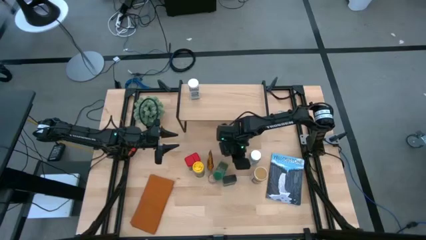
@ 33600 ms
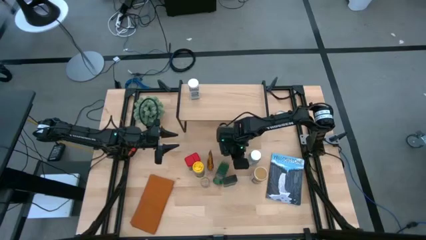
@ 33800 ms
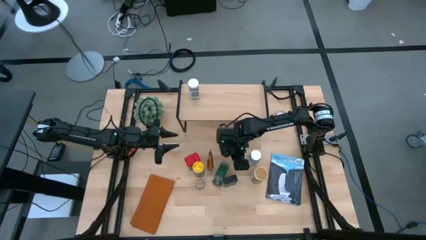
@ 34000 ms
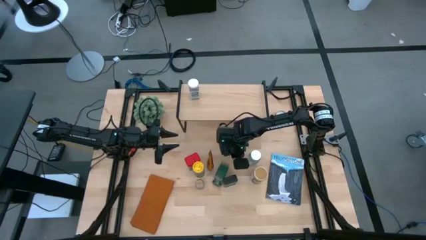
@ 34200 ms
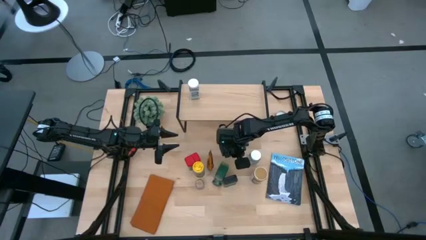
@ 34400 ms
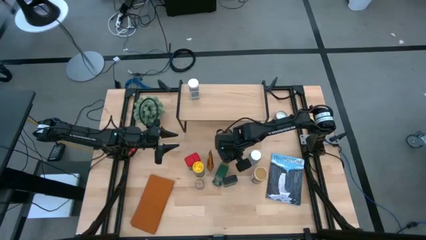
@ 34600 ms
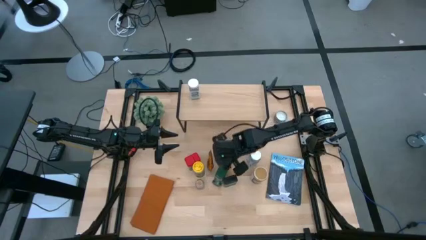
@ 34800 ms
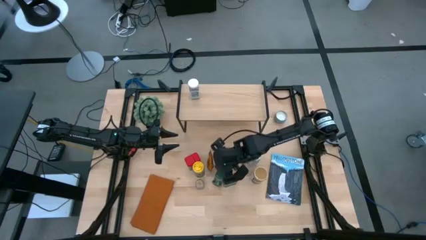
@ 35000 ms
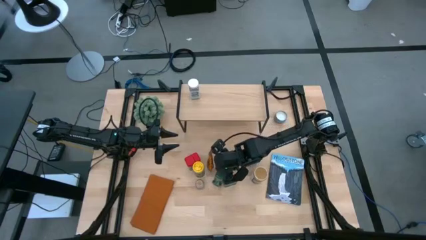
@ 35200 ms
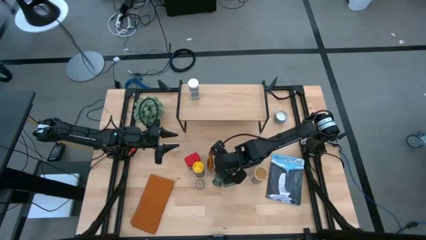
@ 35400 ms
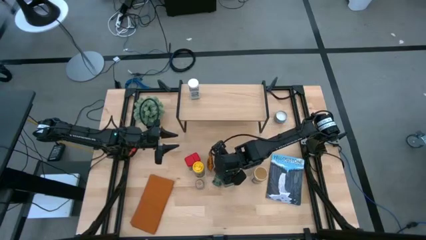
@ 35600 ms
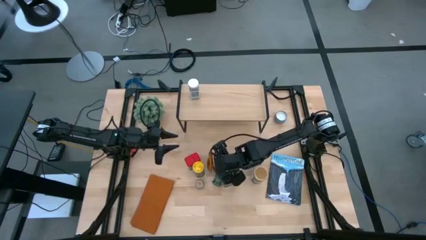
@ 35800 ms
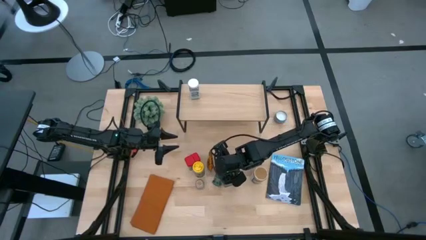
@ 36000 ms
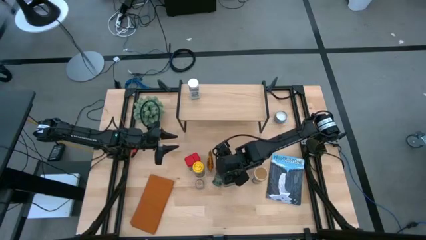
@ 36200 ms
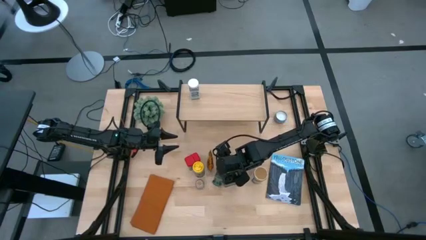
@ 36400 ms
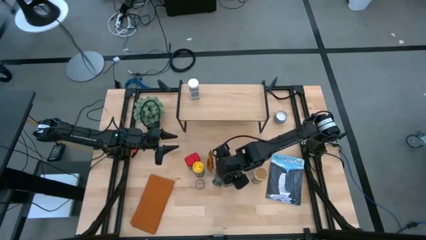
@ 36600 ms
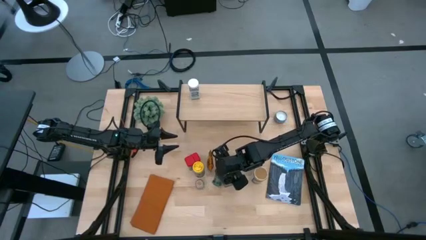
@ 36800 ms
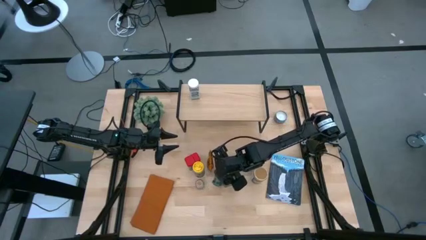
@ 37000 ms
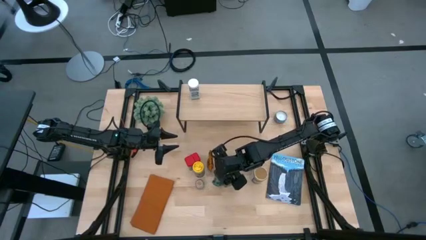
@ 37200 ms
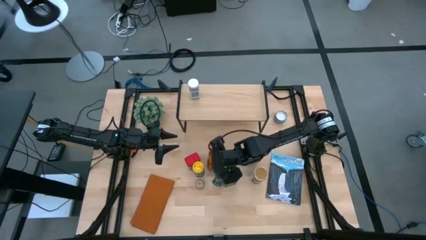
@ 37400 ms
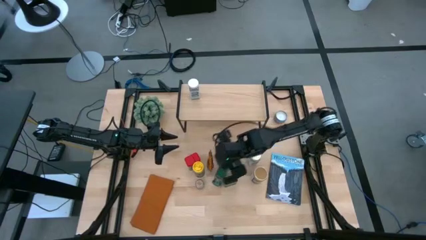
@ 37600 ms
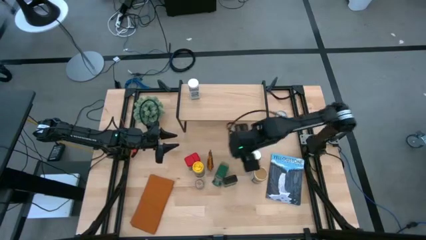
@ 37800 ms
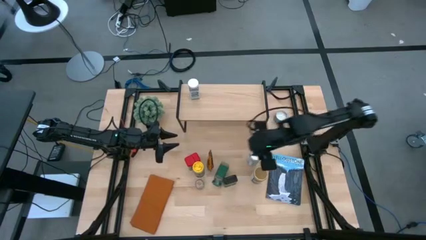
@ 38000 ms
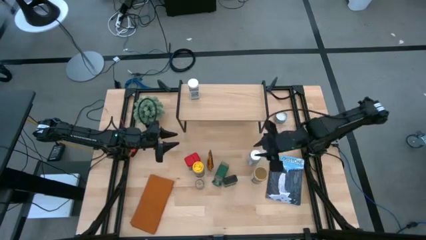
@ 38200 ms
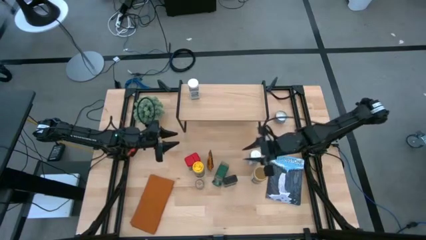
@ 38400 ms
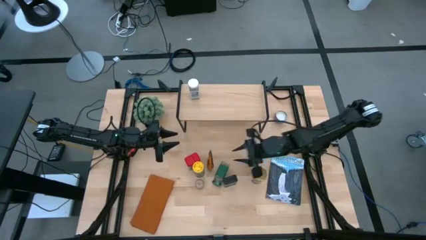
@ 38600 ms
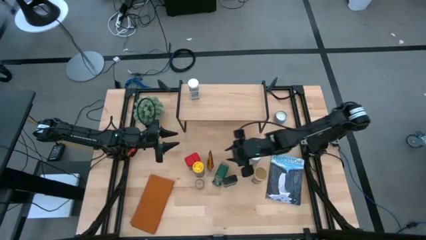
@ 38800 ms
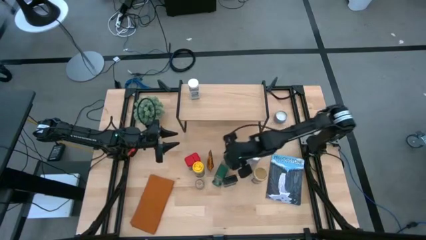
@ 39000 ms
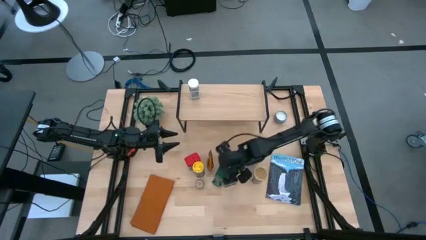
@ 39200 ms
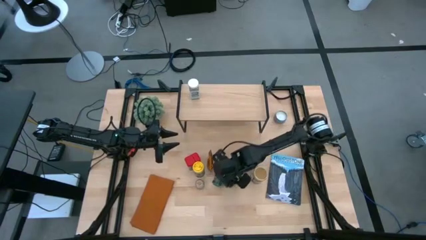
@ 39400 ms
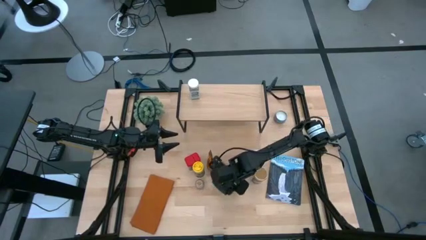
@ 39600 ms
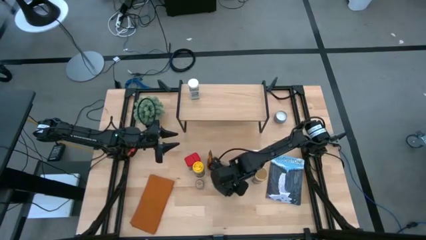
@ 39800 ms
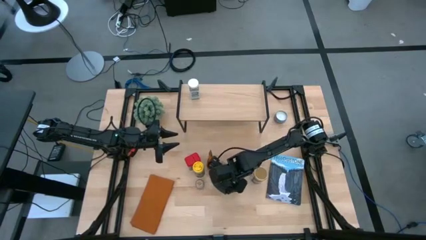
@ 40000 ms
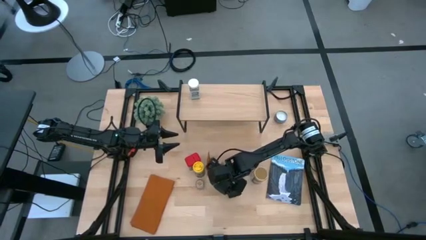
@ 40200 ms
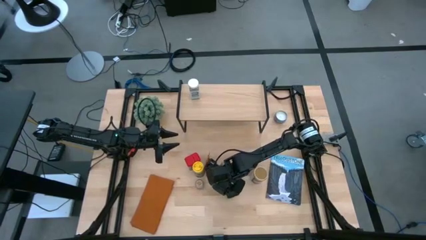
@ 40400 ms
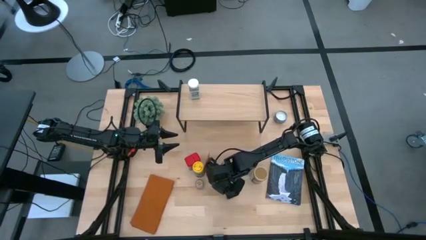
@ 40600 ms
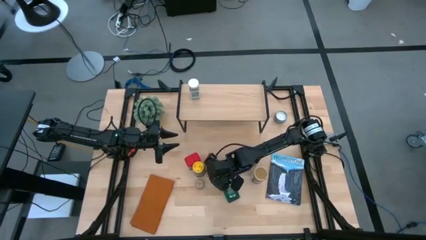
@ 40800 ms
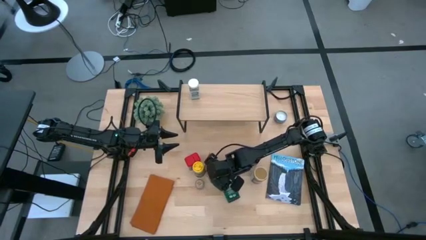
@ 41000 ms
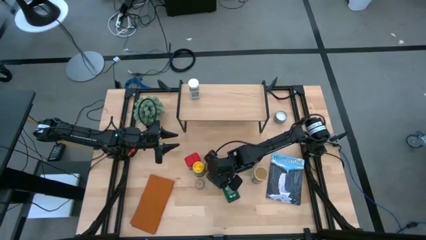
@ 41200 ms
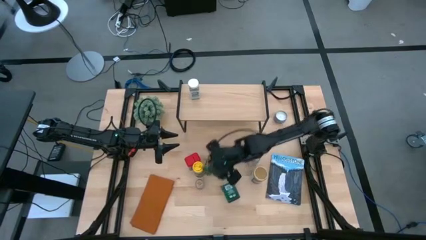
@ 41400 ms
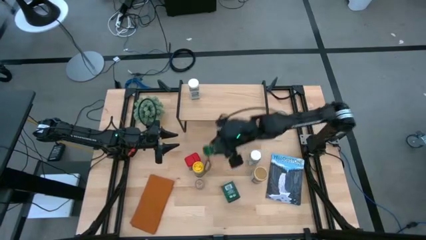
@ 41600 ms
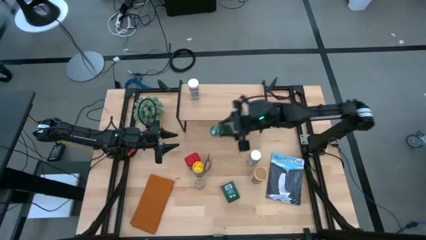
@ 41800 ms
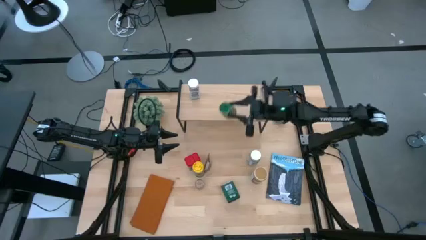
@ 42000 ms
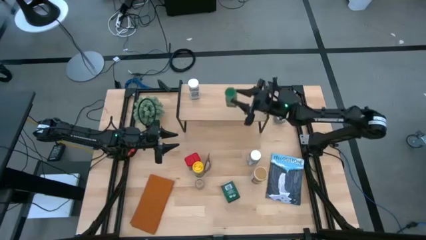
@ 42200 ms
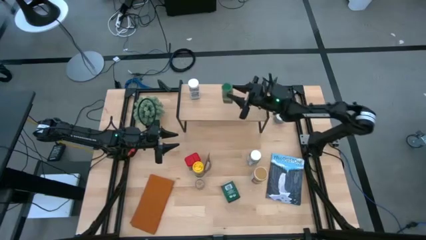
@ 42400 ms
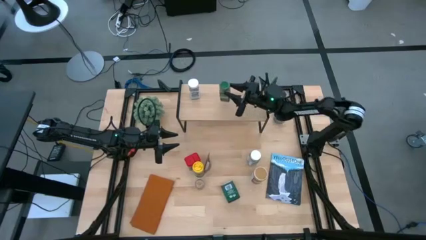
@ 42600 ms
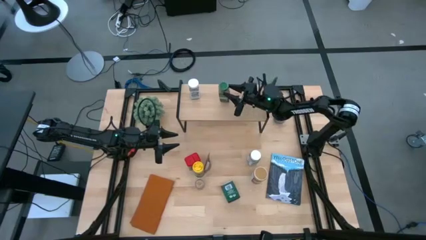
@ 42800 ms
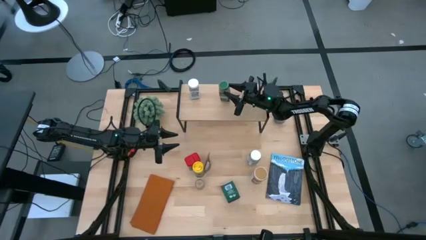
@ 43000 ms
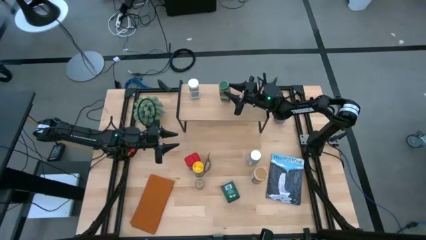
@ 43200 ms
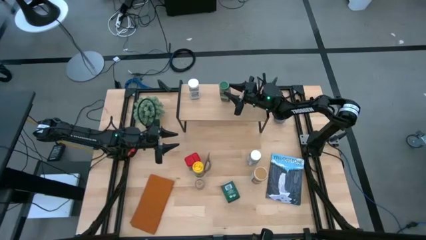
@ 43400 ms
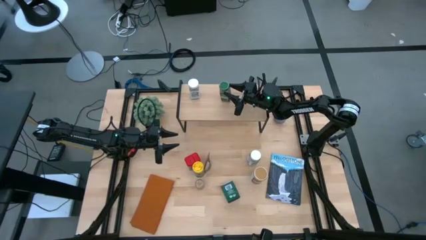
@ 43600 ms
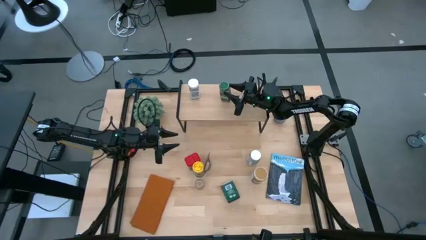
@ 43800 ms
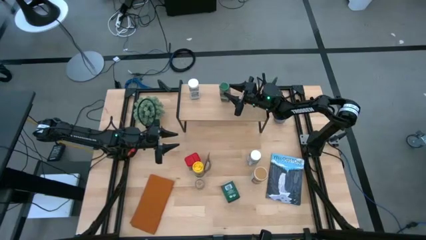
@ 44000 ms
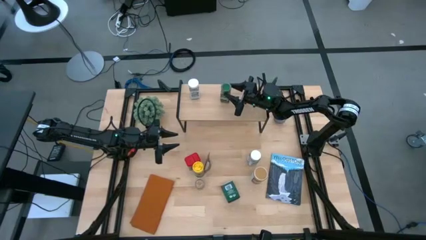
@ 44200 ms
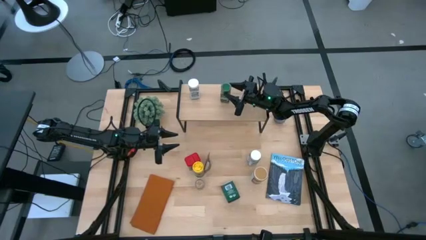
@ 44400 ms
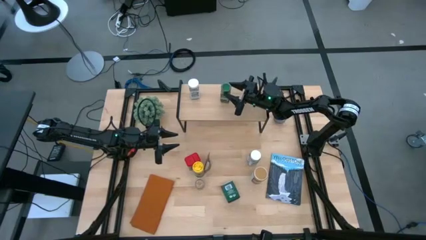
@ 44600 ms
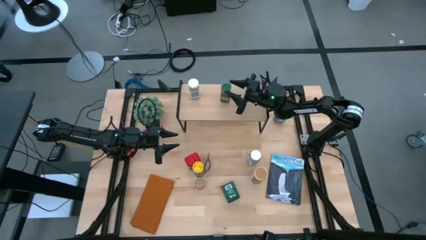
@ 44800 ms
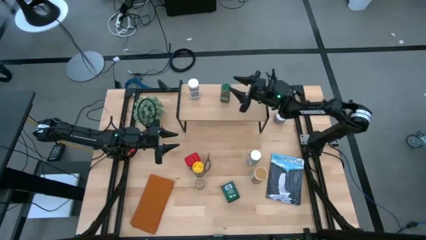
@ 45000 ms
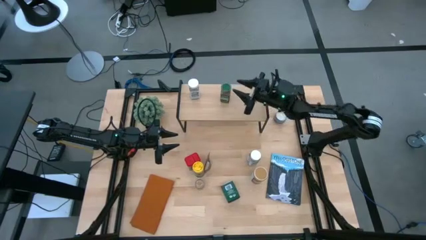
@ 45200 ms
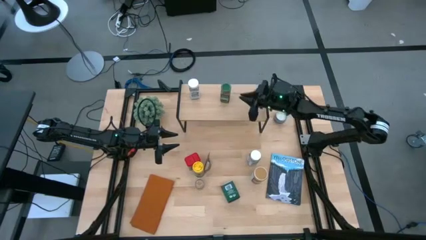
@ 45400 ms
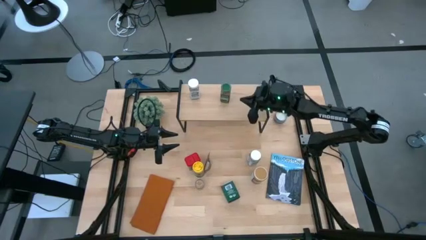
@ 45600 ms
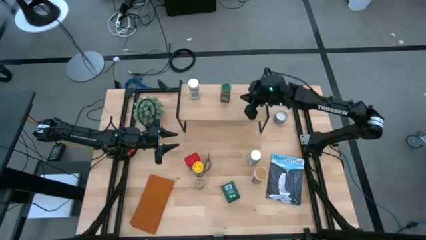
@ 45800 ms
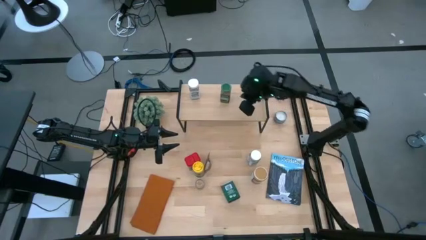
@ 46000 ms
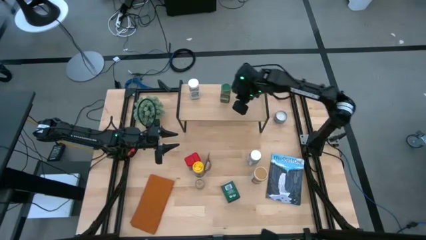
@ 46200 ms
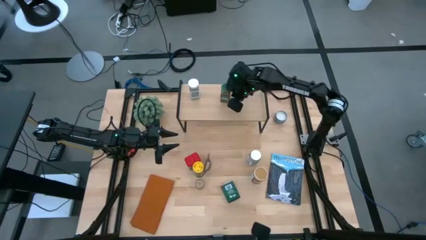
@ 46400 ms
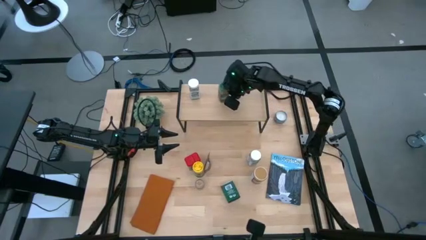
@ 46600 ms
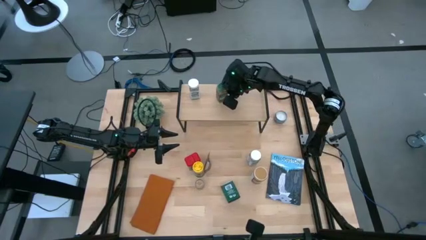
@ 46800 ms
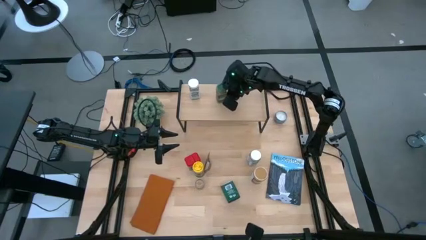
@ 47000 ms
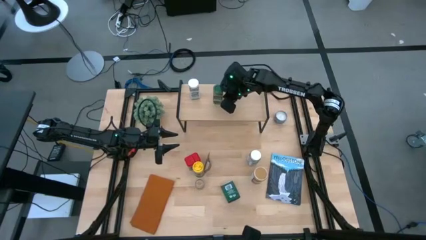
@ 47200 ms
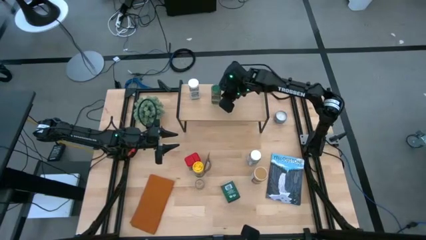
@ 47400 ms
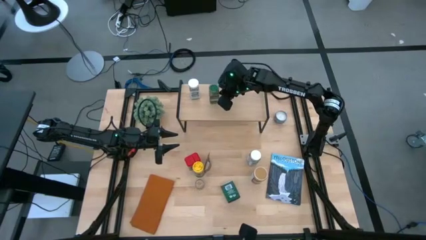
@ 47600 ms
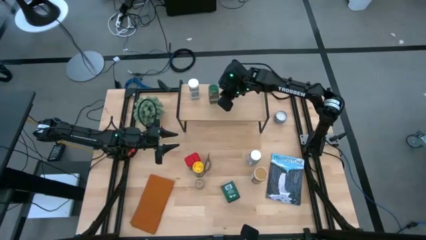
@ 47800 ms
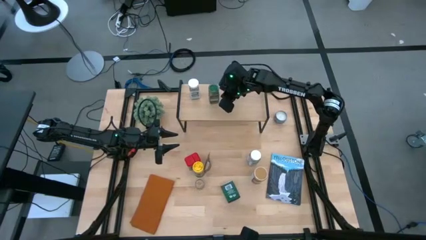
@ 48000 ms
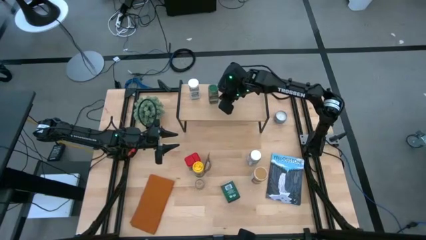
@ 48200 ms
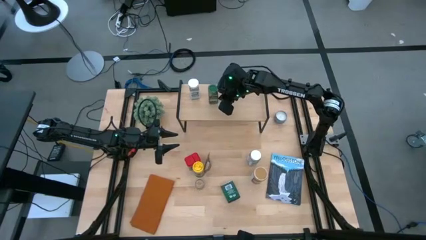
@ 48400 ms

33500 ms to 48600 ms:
Task: Shelf spices
Put the green seasoning bottle on the shelf
